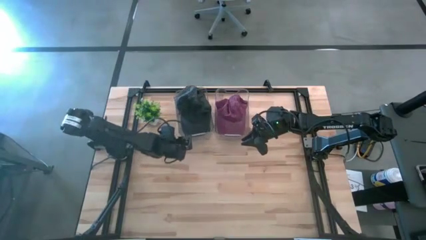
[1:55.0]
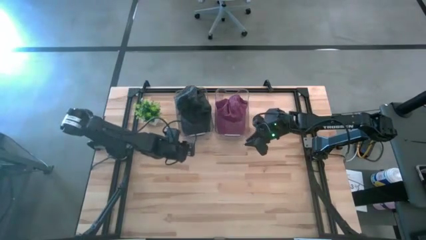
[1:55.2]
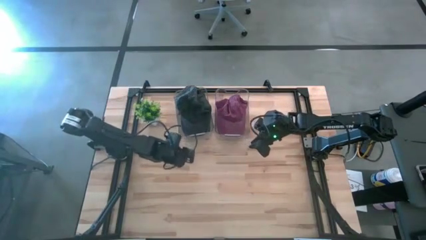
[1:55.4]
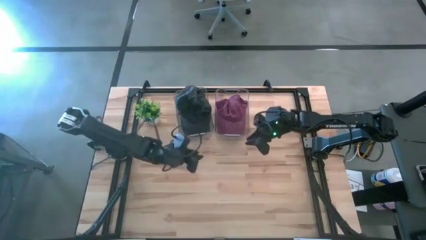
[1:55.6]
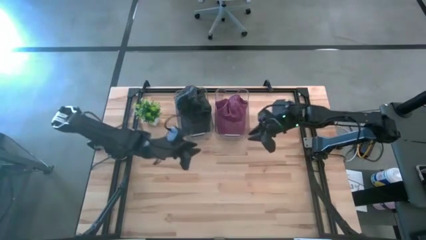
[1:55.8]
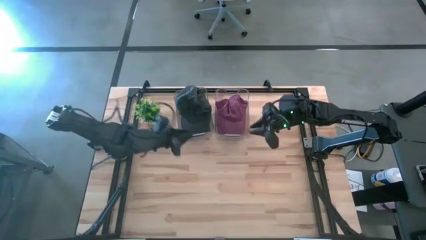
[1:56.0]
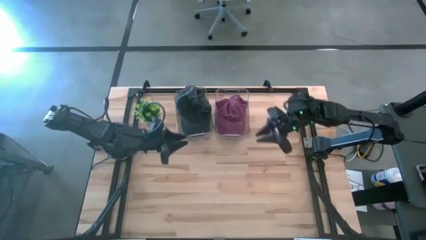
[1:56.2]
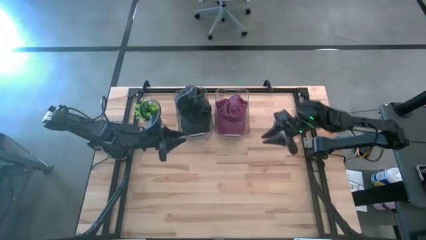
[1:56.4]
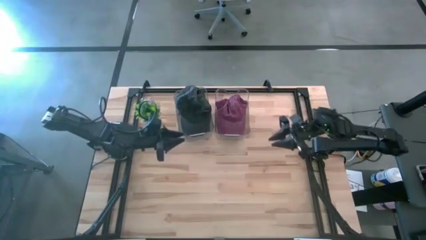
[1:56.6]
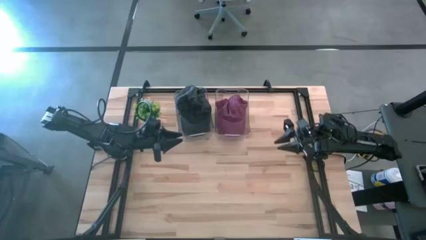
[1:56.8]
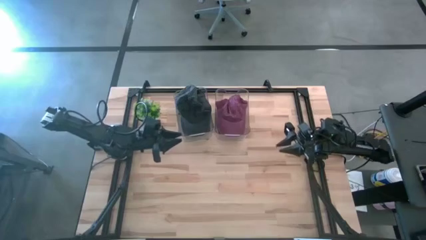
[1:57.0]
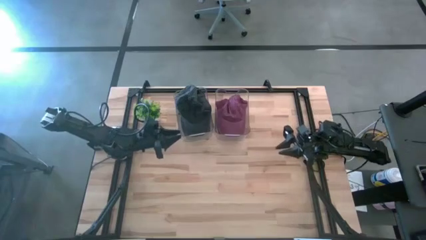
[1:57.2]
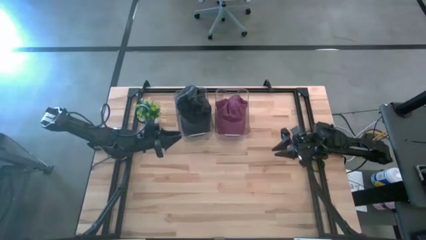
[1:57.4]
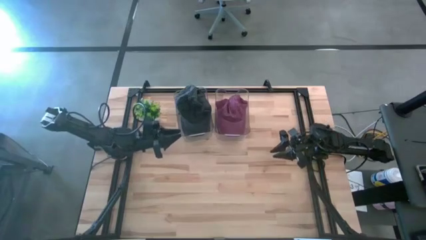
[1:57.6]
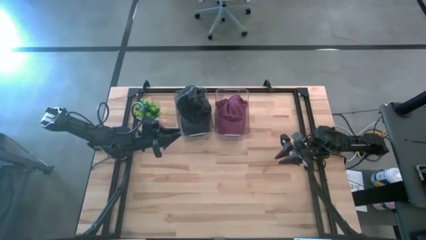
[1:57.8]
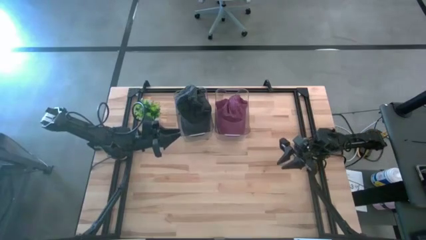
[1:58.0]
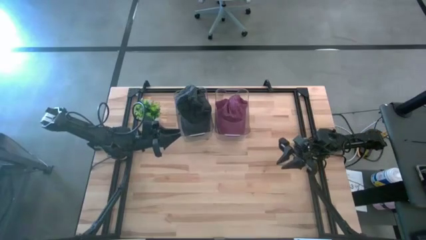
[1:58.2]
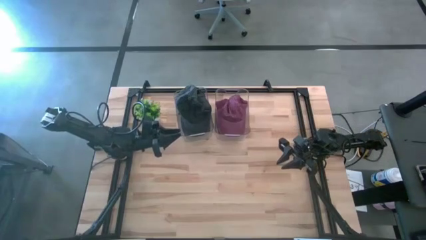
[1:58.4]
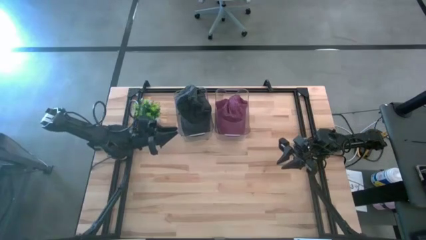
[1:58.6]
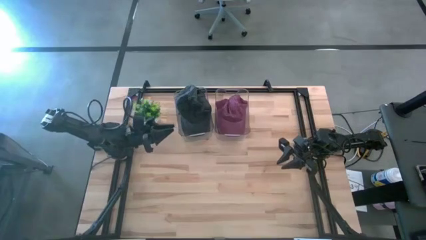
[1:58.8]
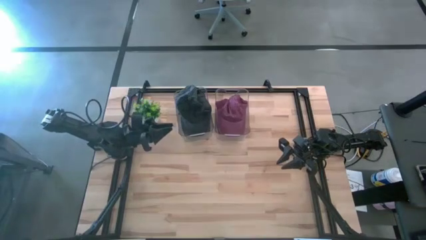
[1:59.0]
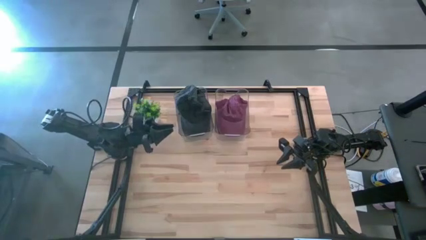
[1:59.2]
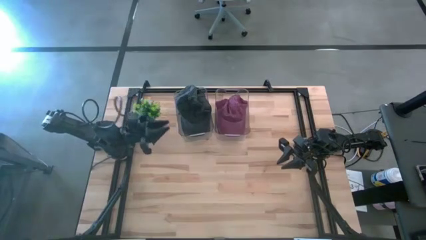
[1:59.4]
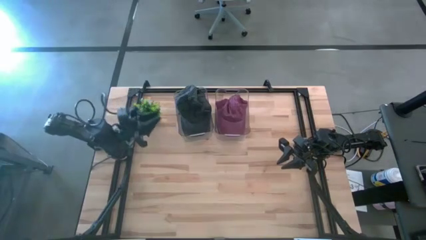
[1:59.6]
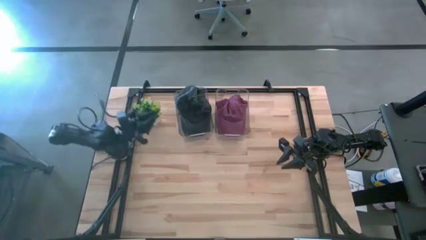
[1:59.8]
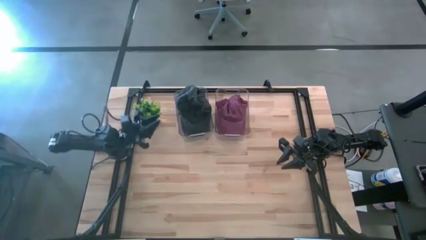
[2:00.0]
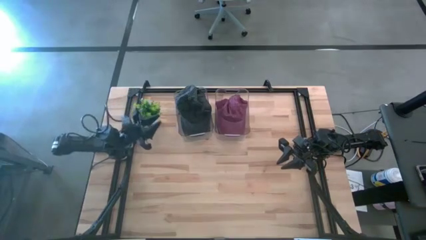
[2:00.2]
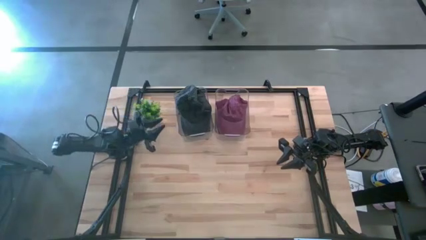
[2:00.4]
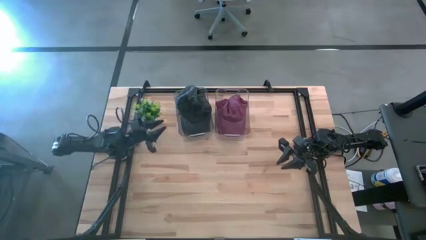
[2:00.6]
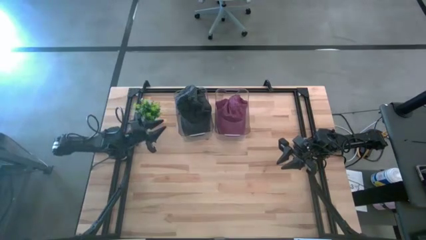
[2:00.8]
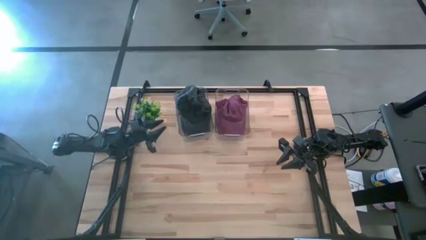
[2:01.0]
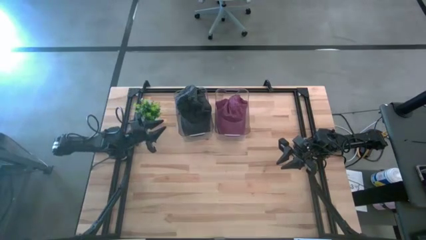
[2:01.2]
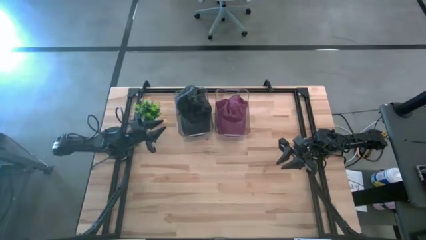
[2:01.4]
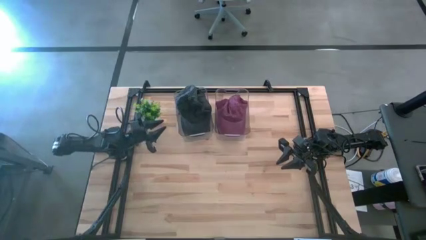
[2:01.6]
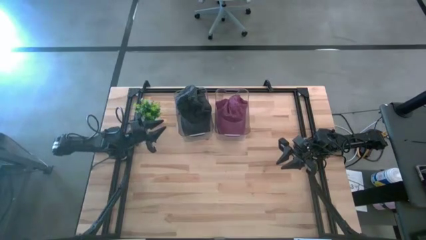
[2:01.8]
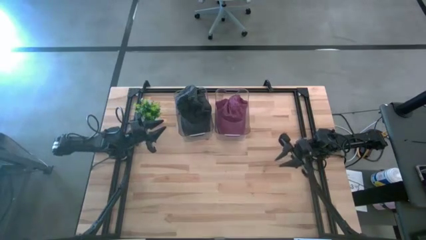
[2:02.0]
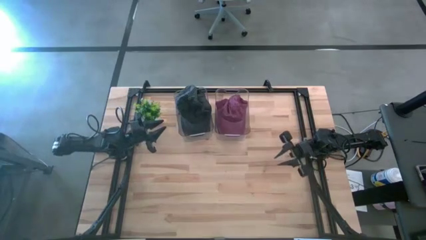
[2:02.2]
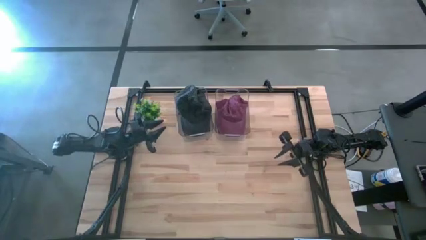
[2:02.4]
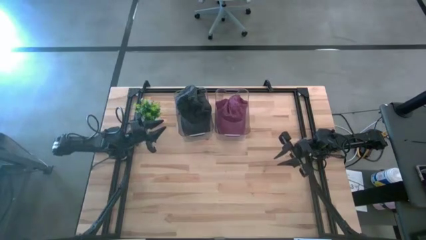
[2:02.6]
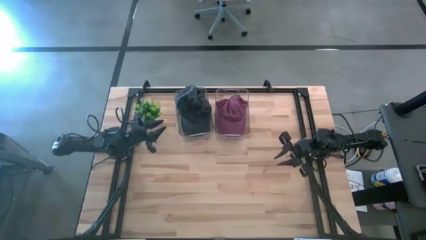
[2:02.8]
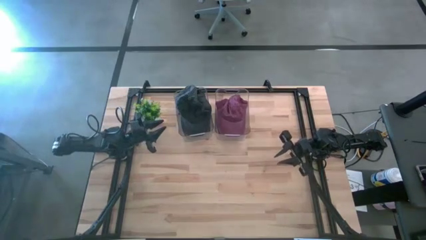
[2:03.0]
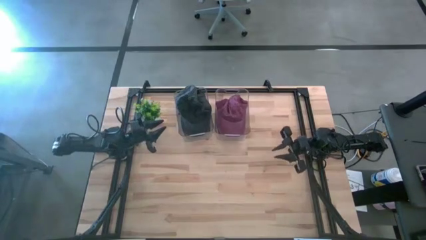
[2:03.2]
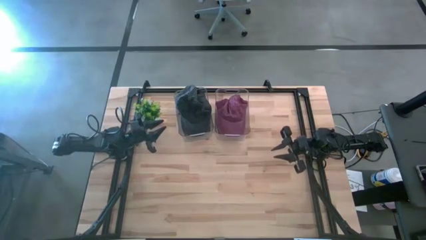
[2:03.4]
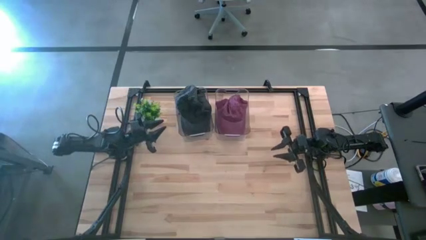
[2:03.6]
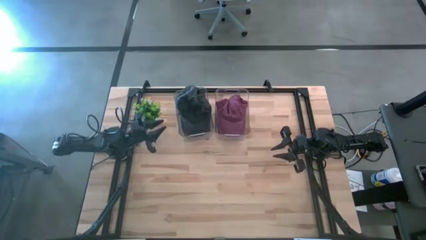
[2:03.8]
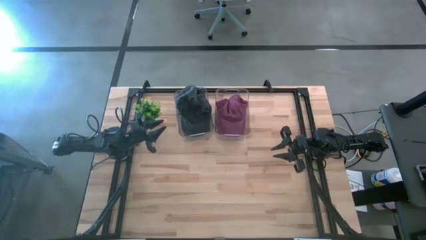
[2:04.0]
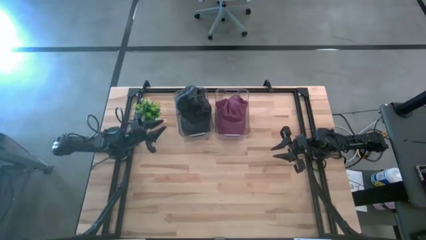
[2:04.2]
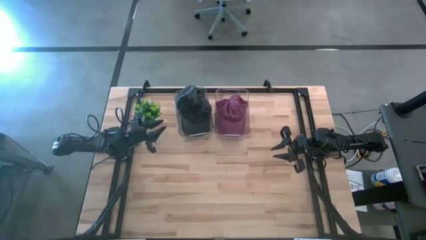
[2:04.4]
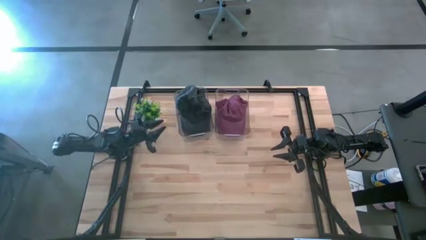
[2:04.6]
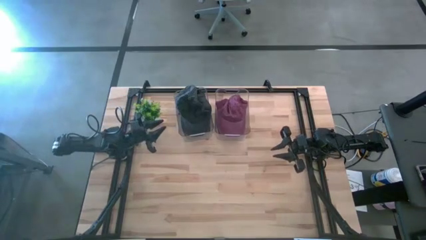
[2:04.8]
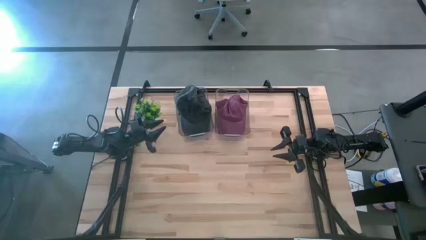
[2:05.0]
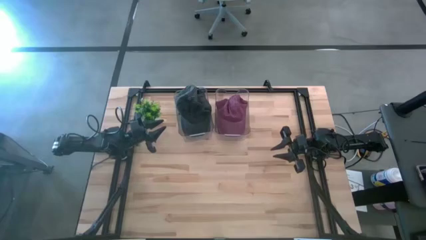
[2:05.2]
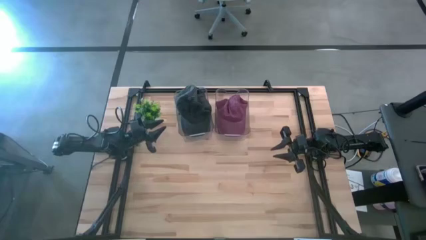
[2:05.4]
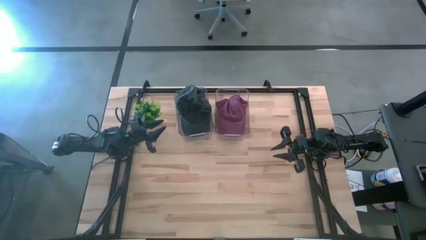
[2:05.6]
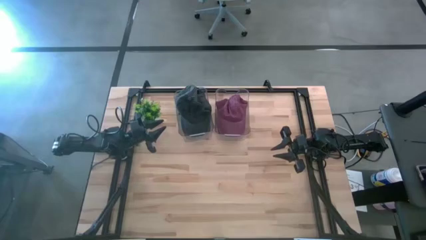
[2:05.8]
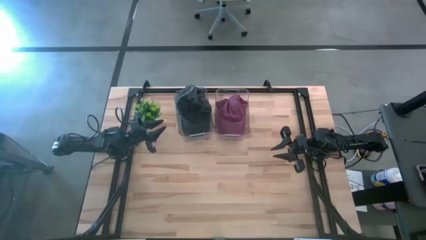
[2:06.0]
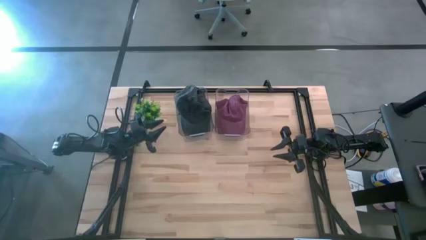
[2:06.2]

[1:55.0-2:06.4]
Task: Pick & Place hat
Return to Home Position

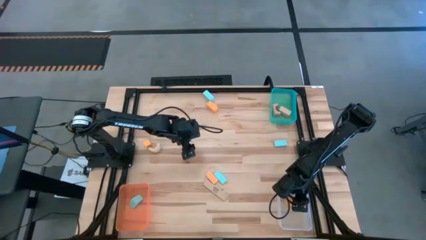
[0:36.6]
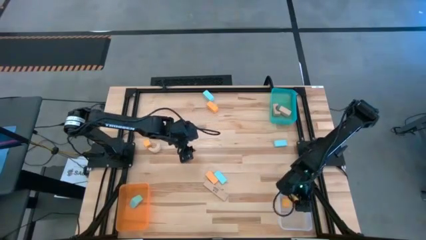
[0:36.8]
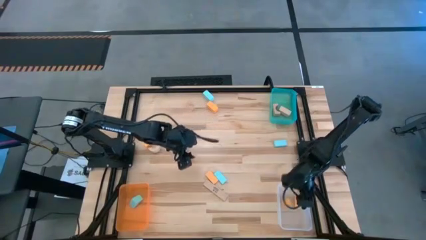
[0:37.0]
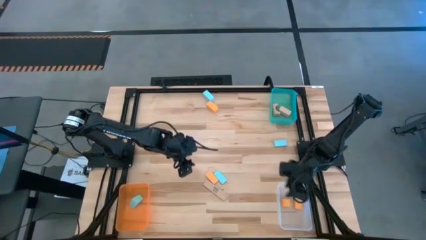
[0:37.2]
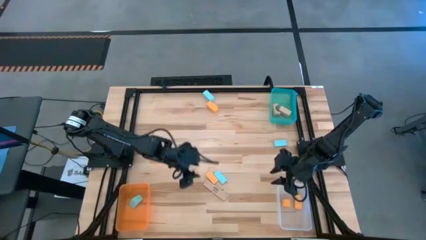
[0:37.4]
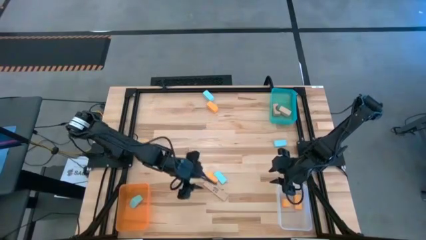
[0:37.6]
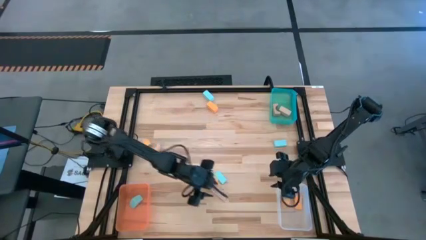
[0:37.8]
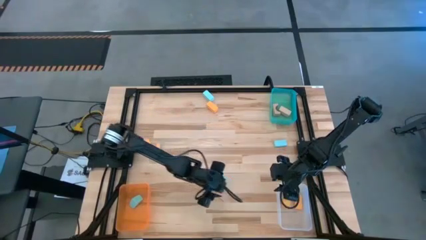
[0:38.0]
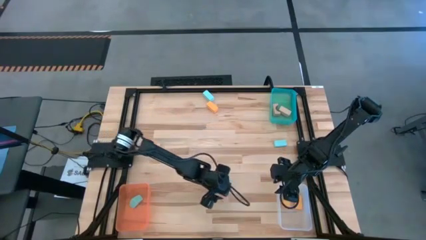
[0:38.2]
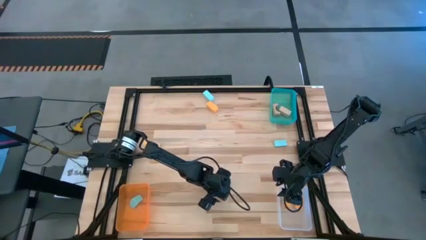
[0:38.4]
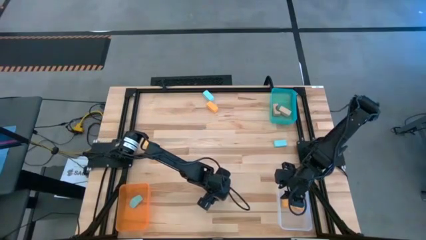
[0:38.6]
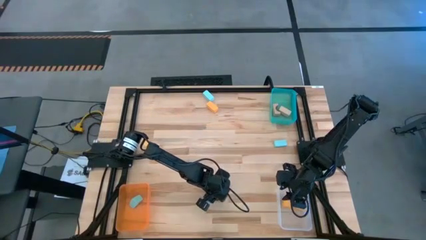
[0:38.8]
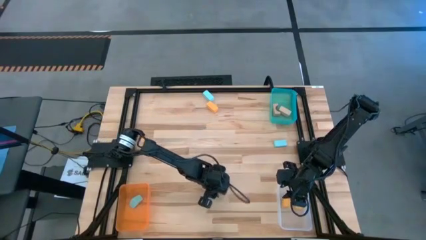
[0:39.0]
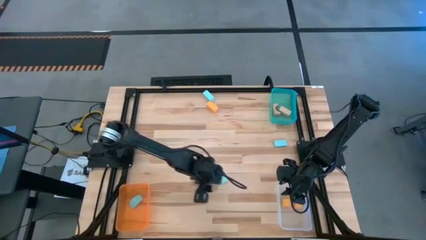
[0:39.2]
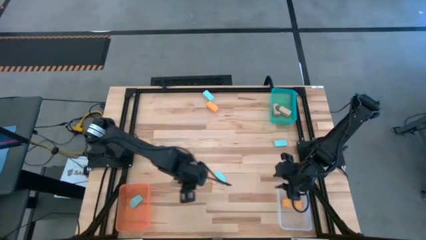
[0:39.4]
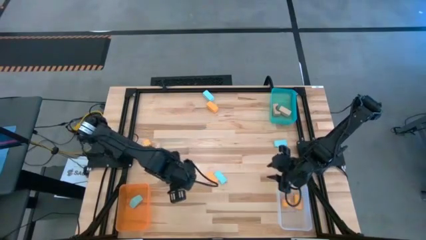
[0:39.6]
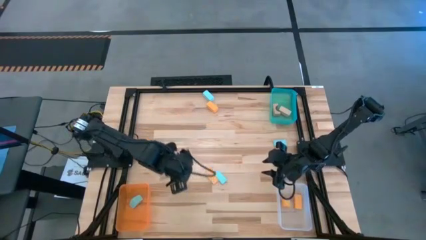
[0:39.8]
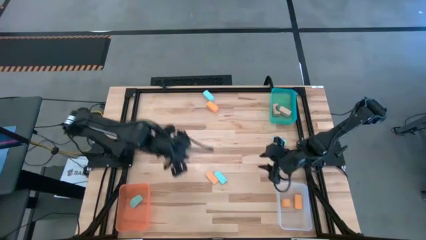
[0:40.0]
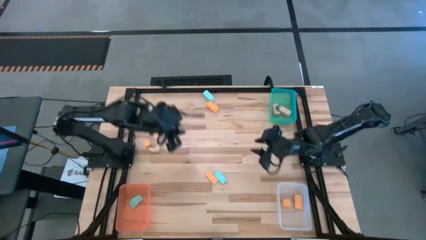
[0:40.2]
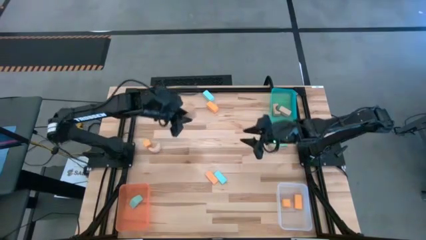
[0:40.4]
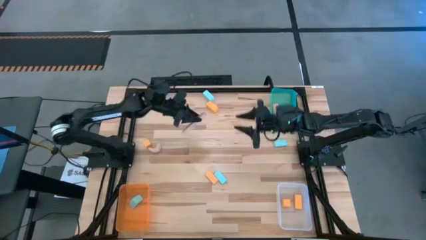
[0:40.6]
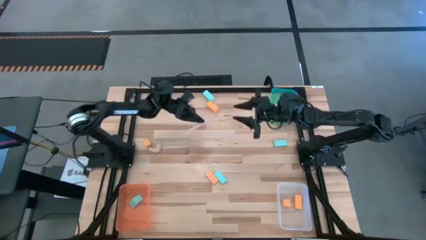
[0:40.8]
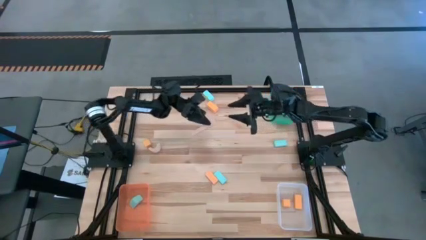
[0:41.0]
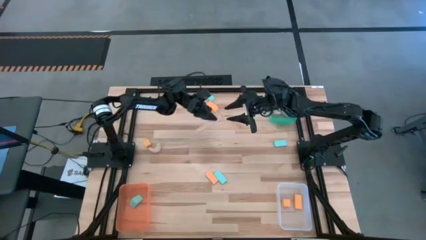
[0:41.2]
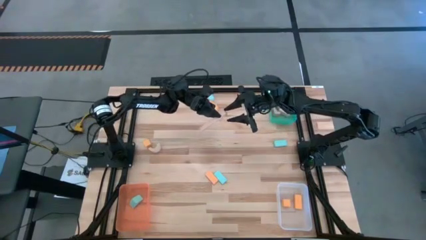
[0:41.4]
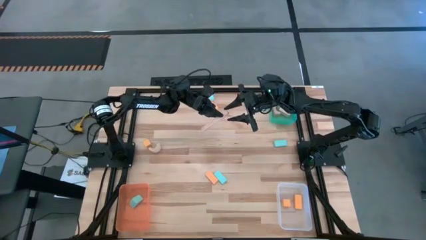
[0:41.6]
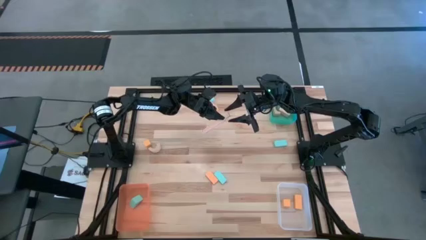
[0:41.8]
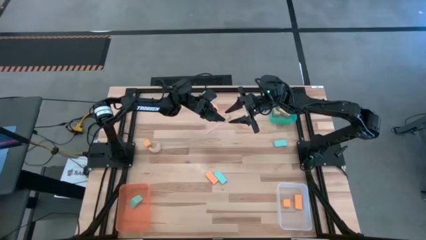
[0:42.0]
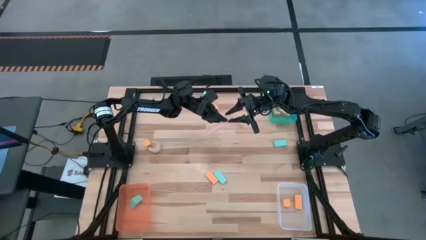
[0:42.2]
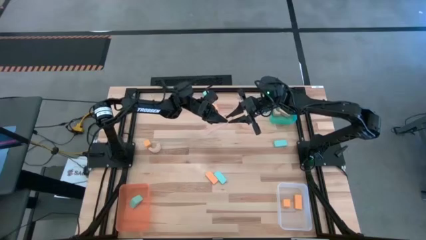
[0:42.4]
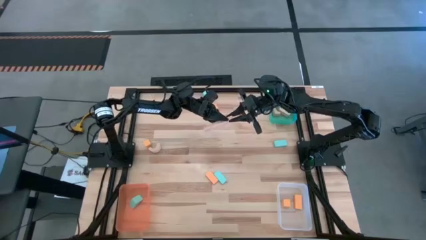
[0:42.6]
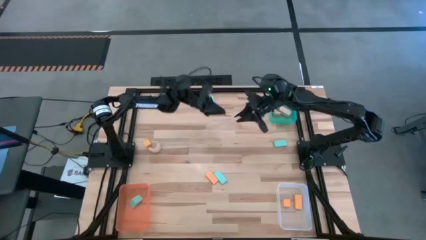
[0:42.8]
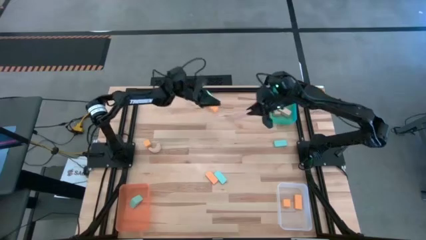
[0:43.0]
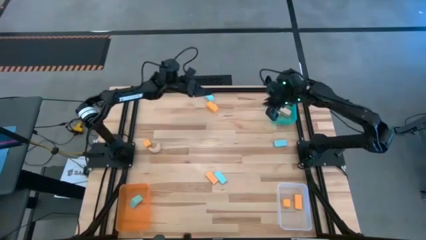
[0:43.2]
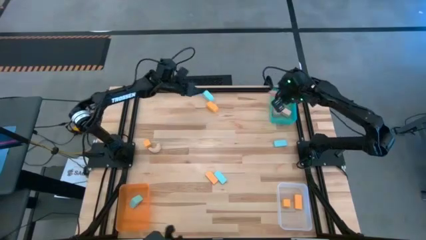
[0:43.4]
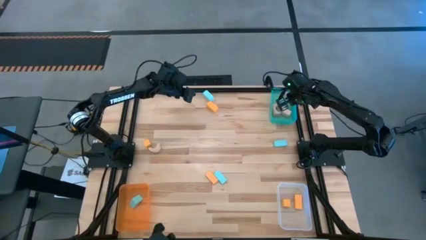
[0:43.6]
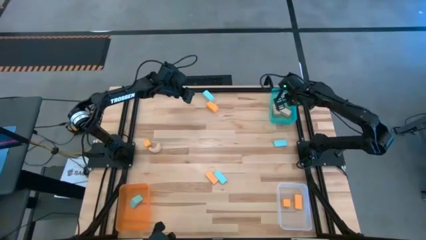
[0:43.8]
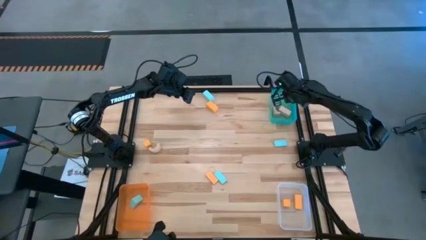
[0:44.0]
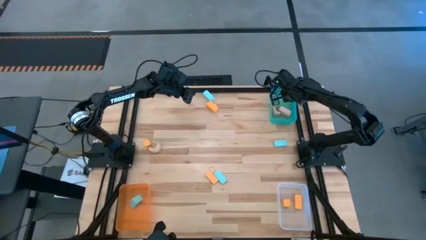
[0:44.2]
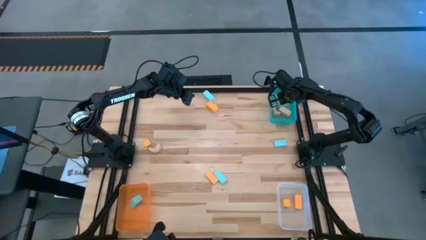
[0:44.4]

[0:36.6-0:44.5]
Task: Sort & place blocks by color
Put the brown block into the green bin
